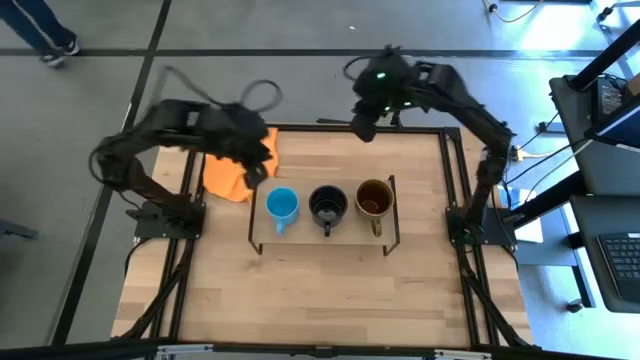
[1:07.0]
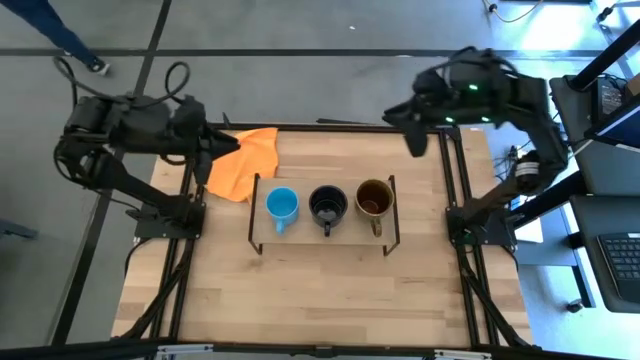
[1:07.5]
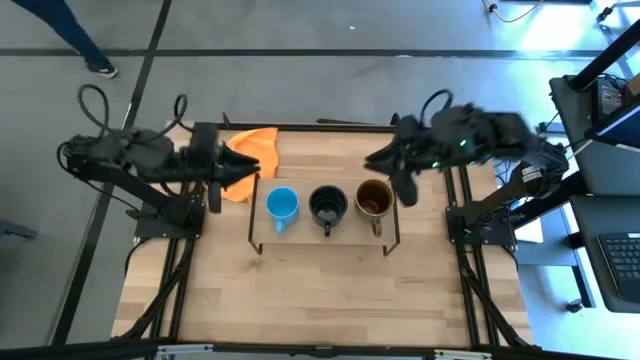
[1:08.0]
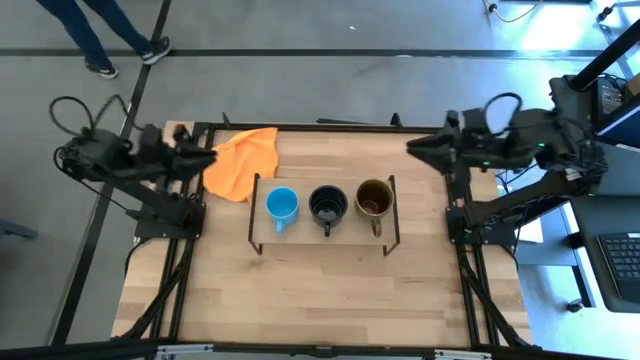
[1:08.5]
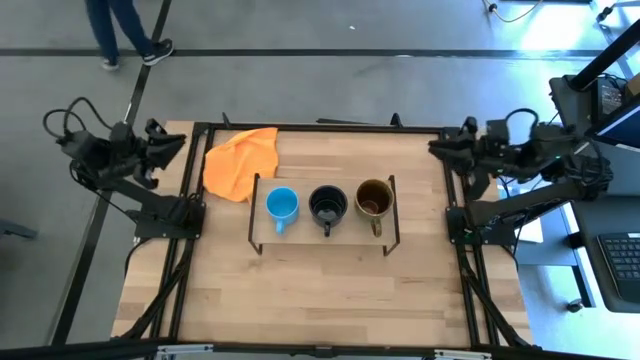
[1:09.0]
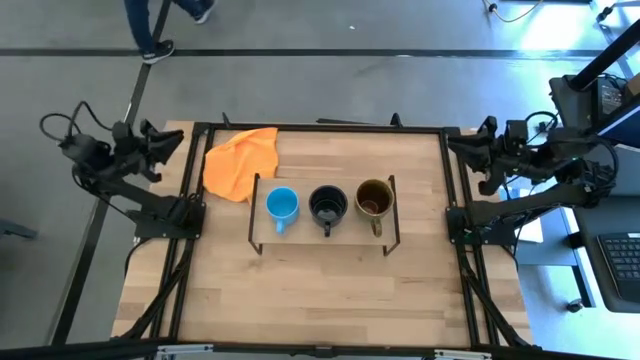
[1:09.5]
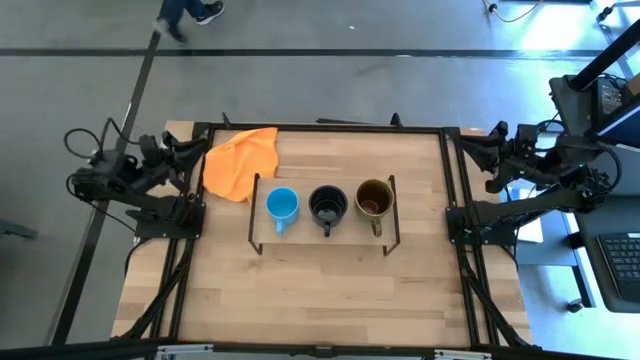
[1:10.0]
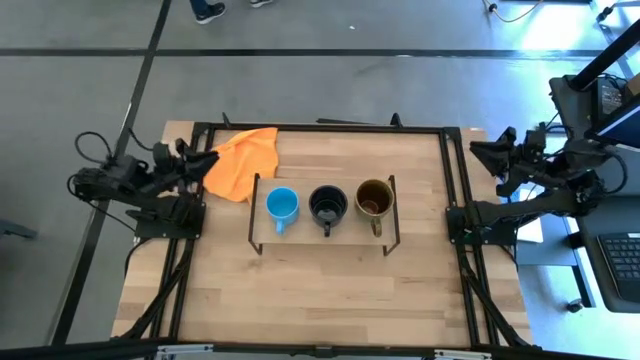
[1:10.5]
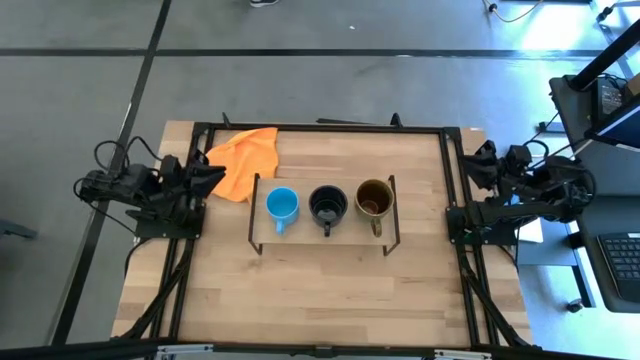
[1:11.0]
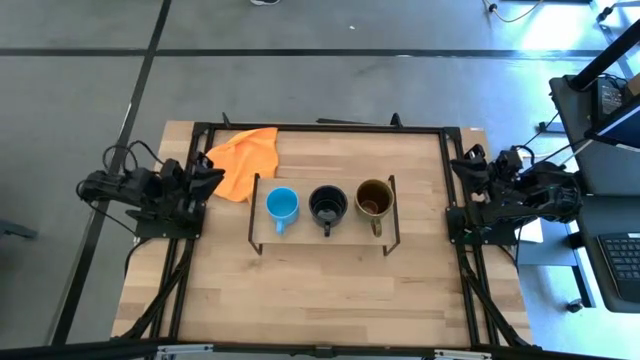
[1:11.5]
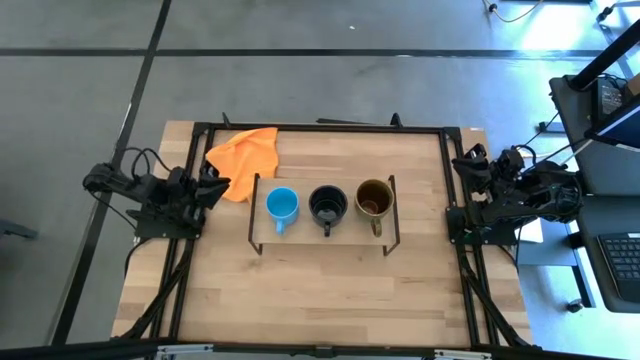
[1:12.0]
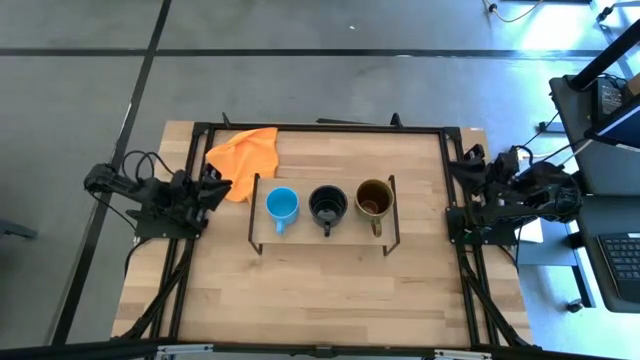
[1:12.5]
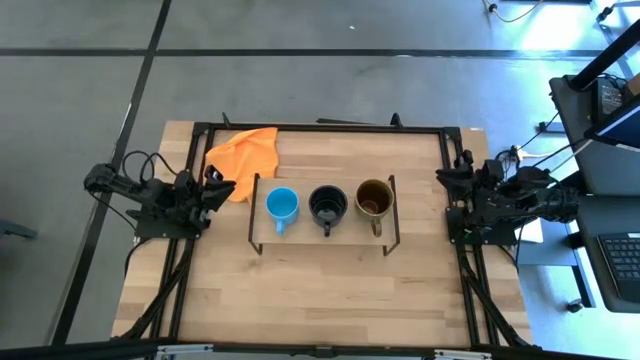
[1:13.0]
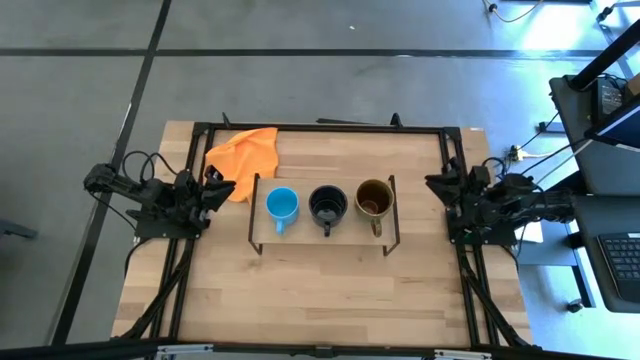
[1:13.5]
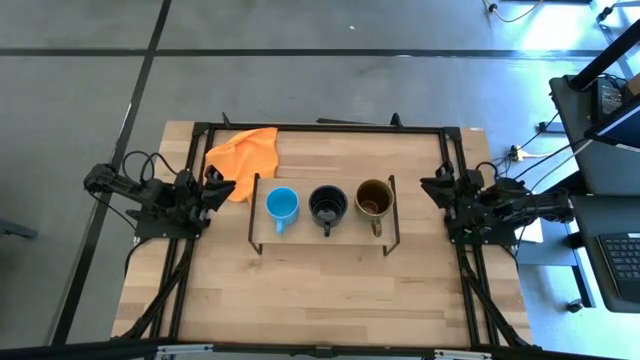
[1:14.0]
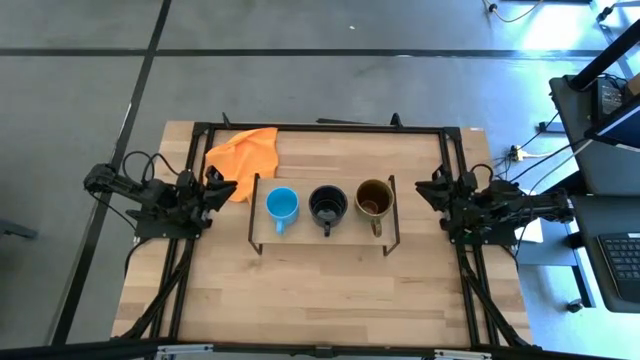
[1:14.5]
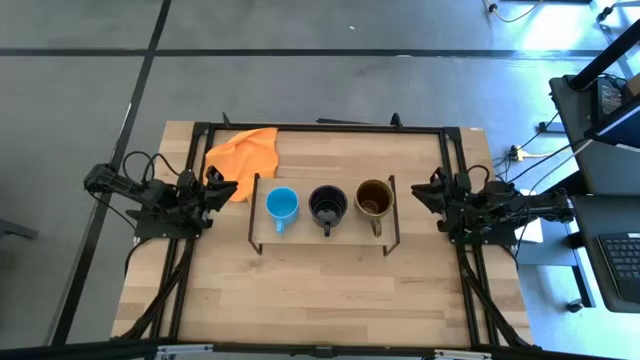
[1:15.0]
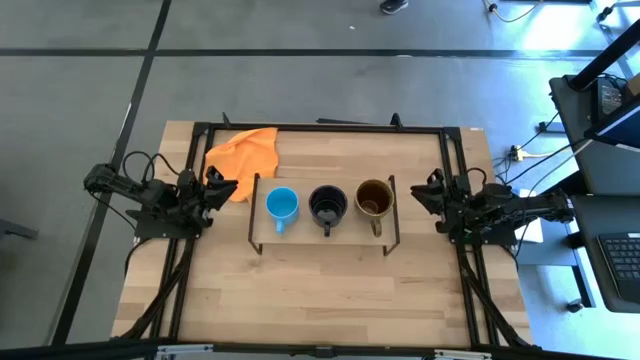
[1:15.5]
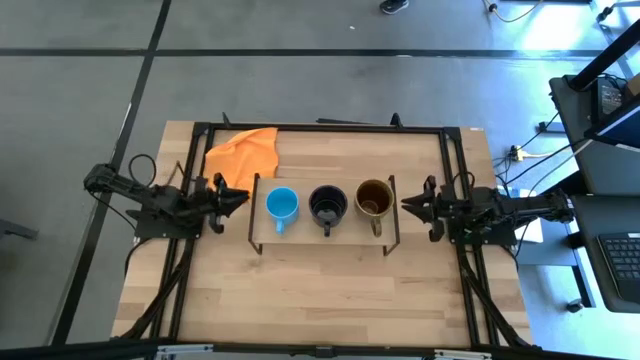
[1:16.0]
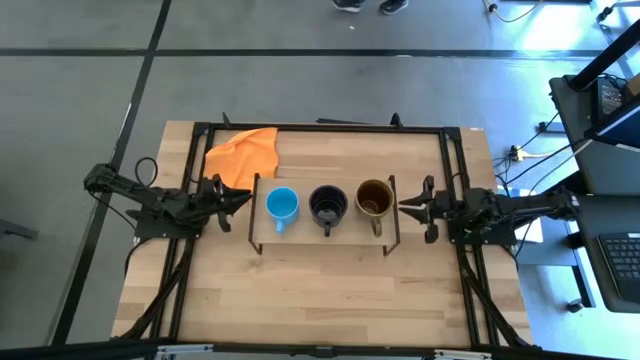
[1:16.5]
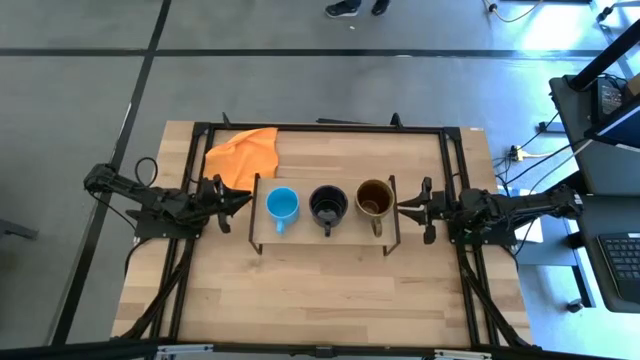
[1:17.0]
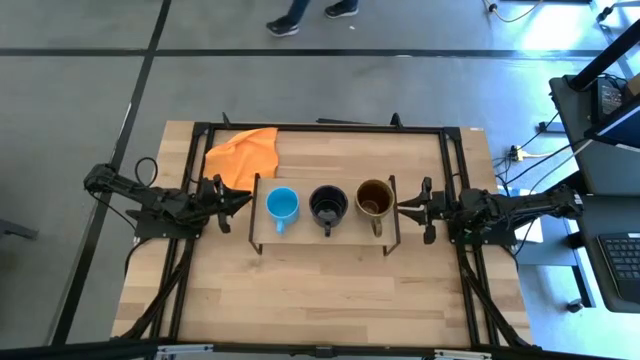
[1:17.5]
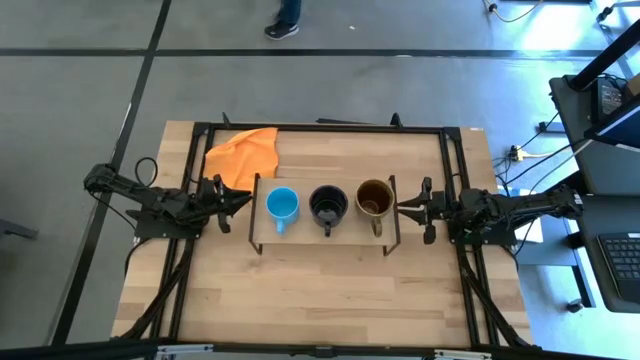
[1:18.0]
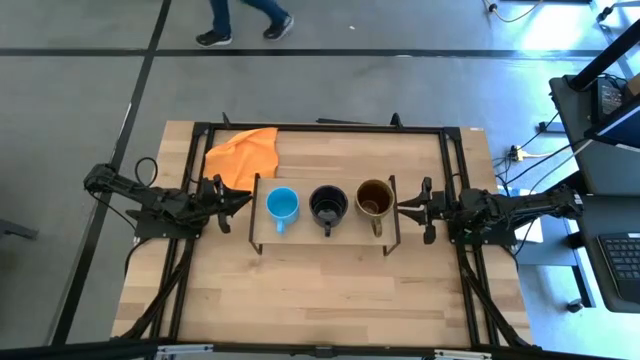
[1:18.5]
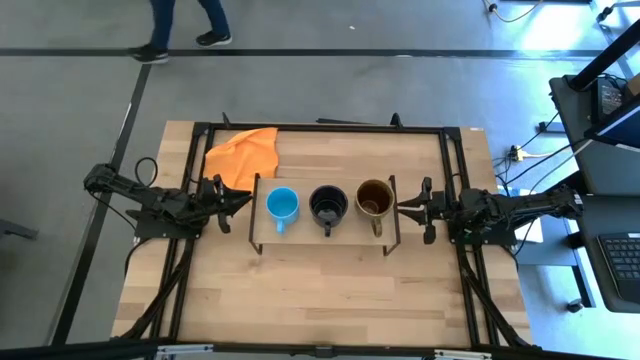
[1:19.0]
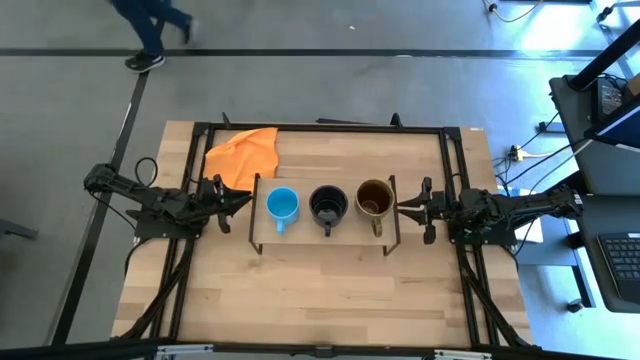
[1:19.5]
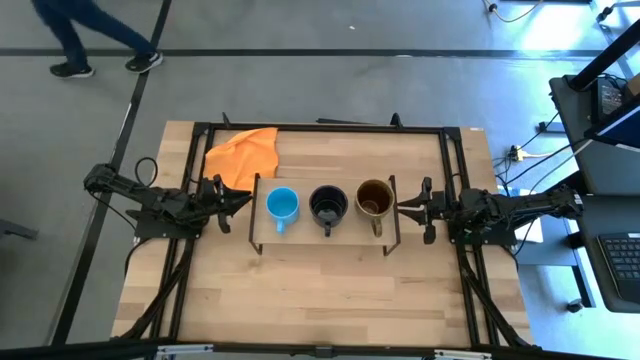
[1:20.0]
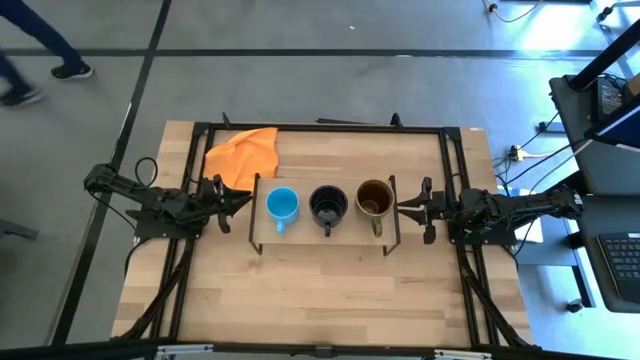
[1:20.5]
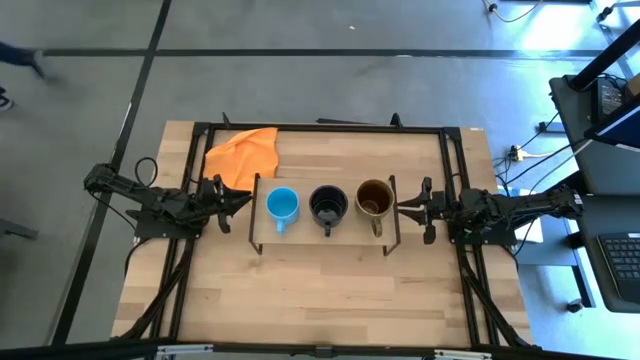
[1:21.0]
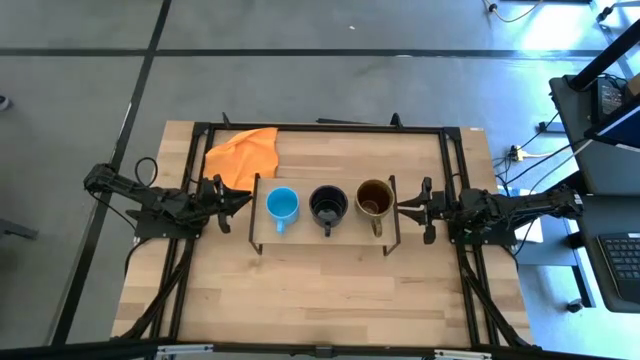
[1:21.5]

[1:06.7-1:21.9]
Task: Stack small to large cups/mugs on shelf
Return to Home Position

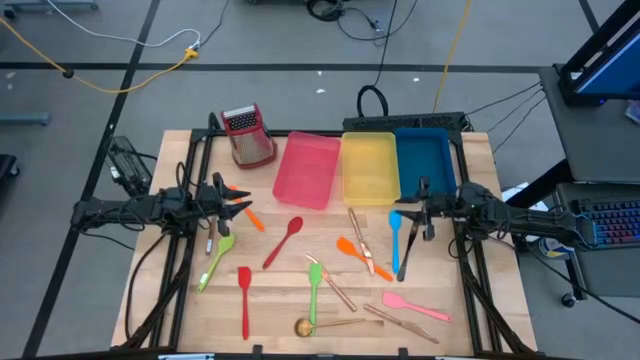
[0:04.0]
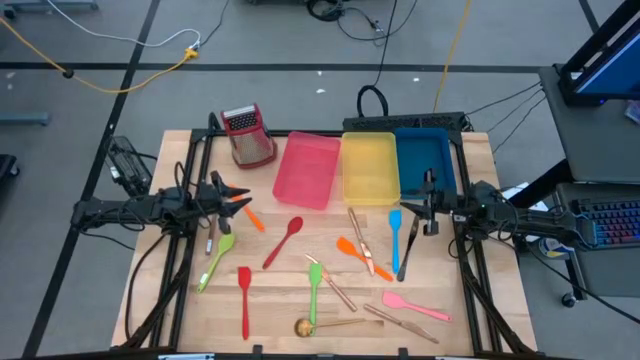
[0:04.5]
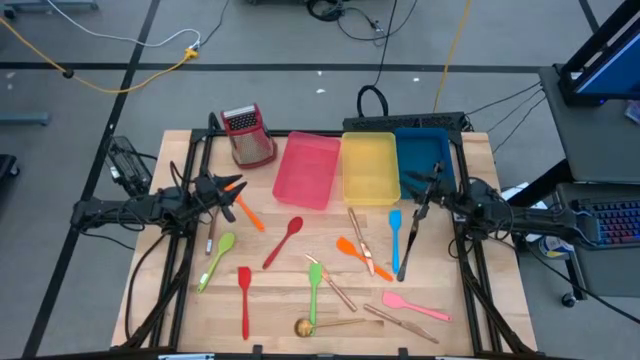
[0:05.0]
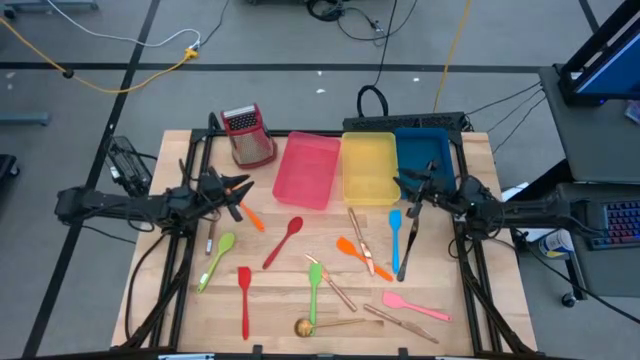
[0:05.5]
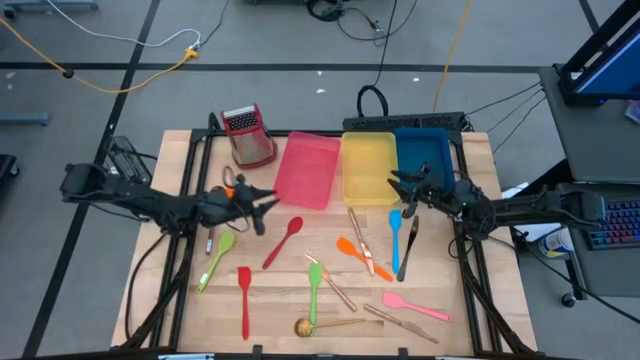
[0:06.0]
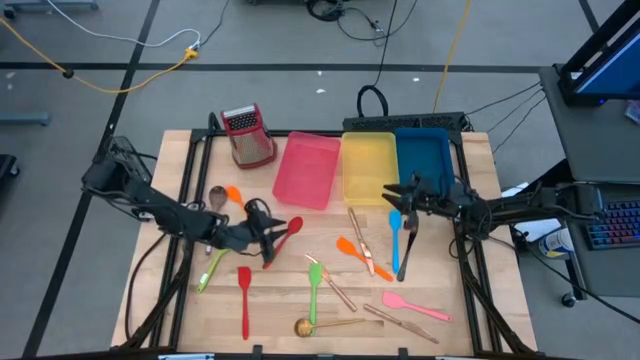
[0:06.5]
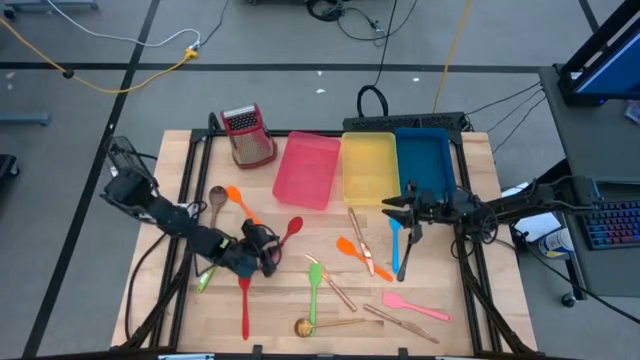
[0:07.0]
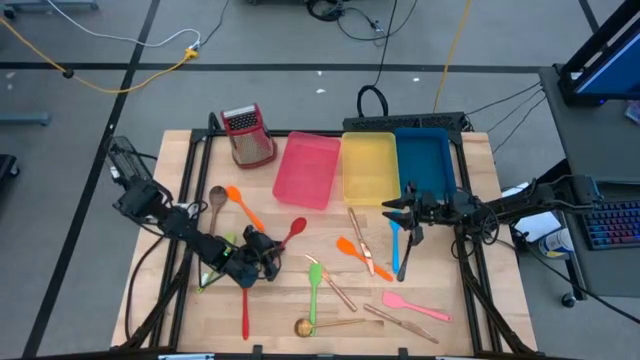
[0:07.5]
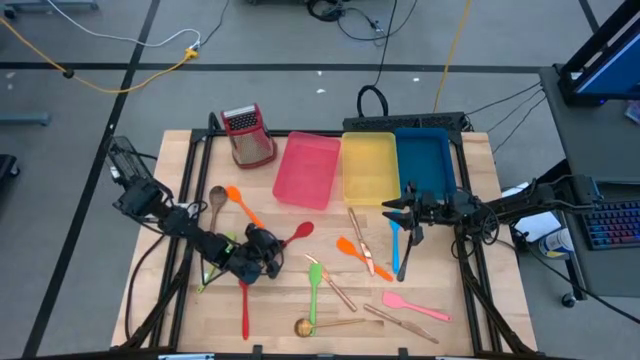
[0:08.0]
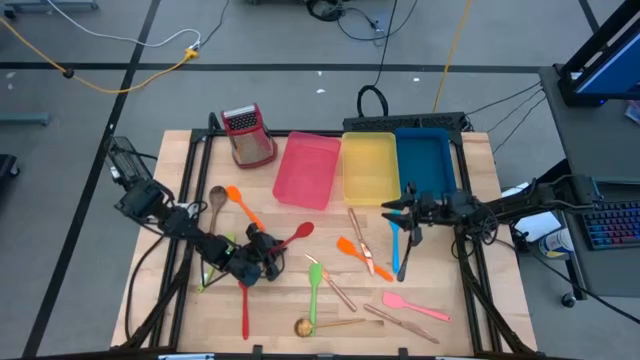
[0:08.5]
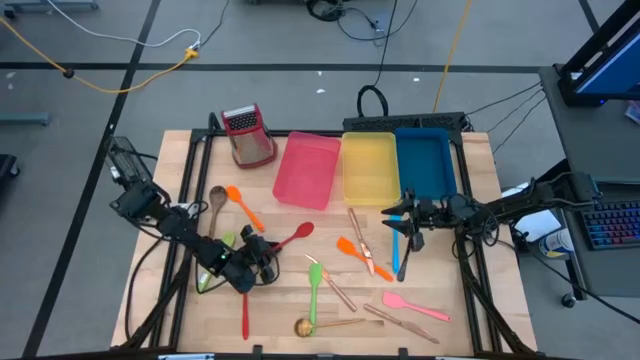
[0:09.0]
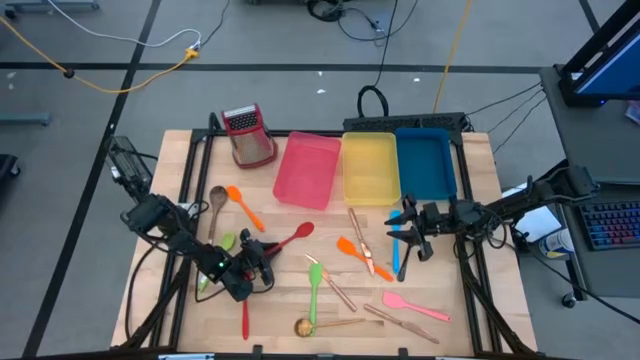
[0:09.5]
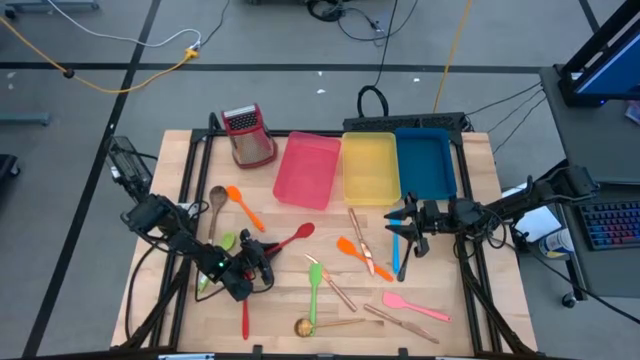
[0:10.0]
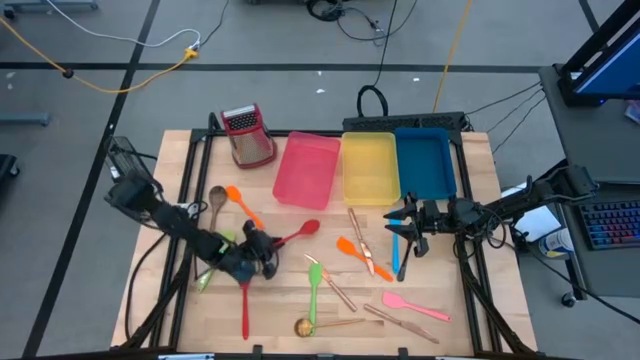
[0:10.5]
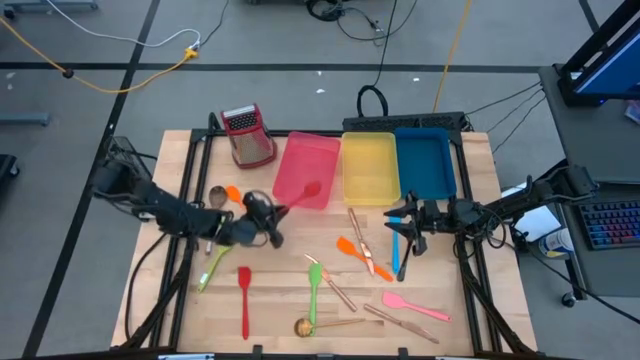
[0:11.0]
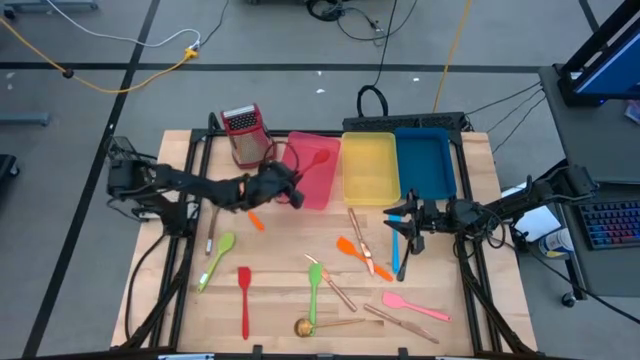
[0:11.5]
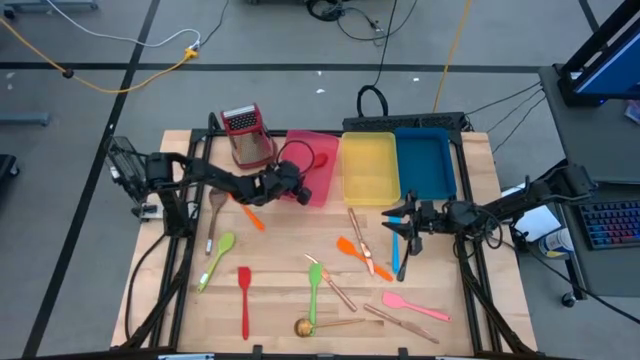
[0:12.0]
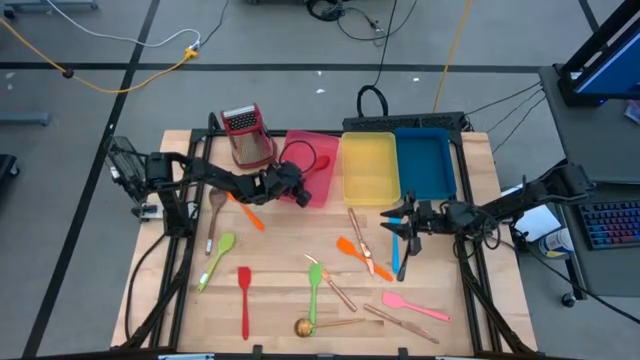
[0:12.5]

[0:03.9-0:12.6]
Task: Pick & Place Kitchen Items
Put the red serving spoon into the red bin
